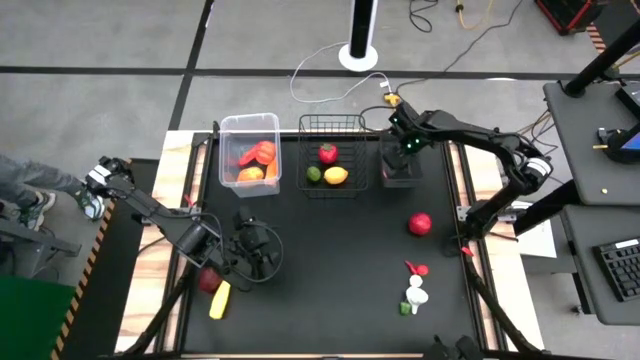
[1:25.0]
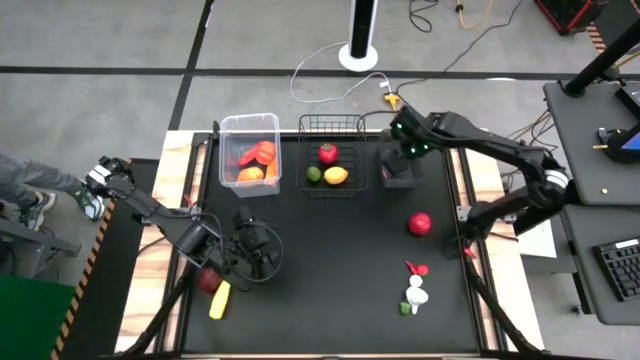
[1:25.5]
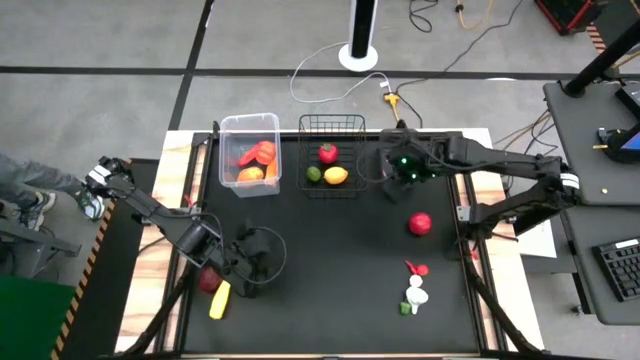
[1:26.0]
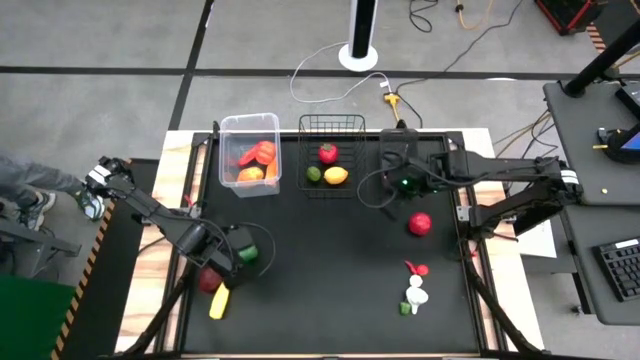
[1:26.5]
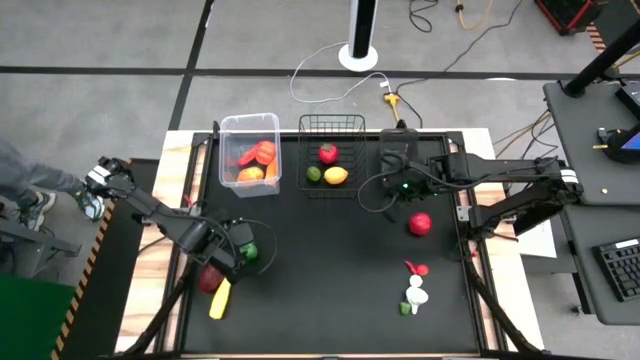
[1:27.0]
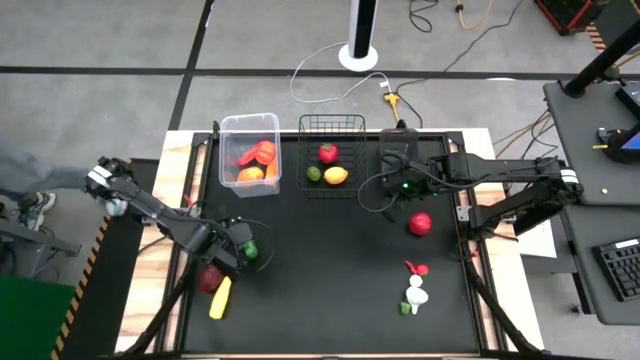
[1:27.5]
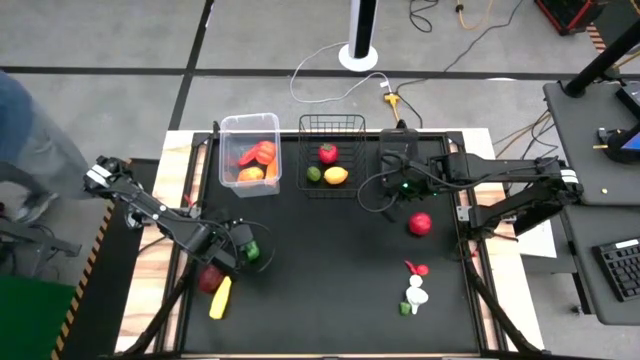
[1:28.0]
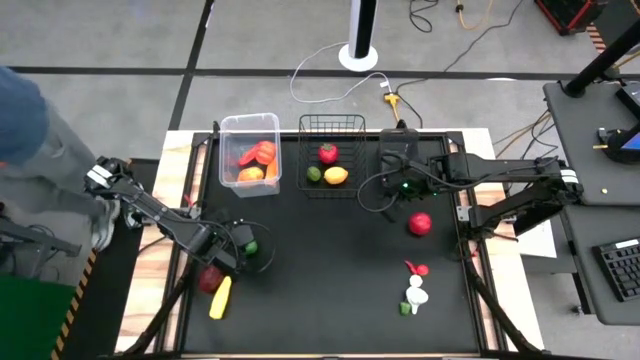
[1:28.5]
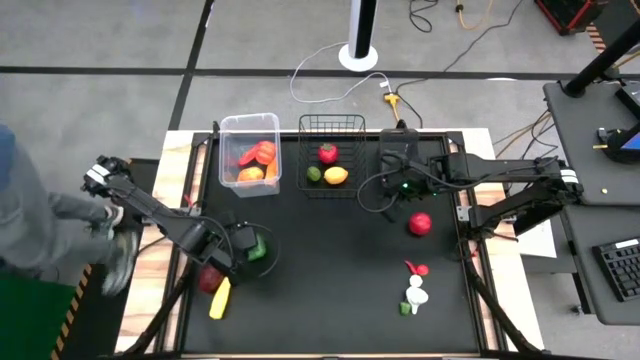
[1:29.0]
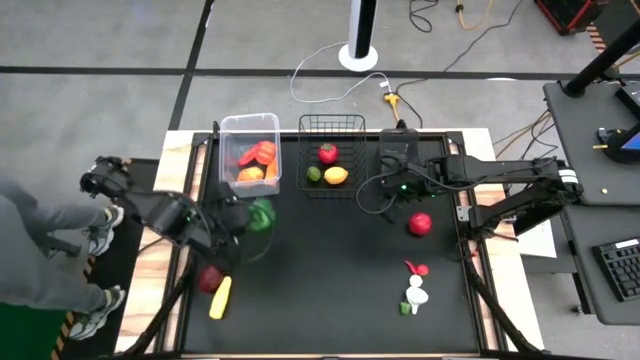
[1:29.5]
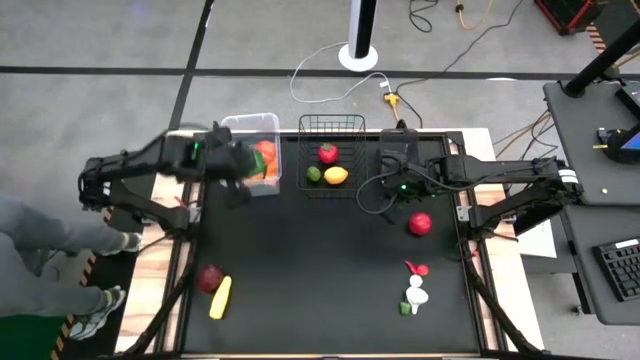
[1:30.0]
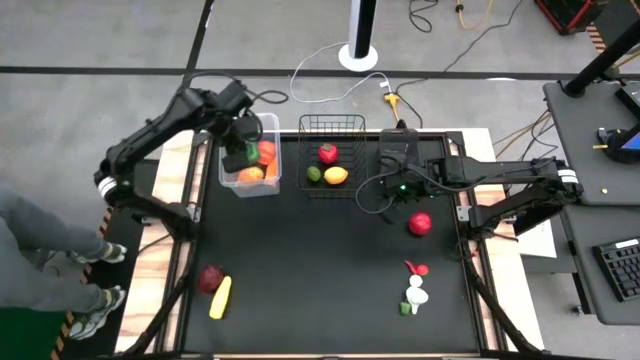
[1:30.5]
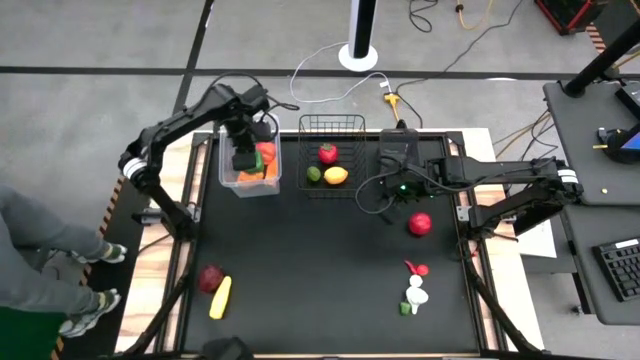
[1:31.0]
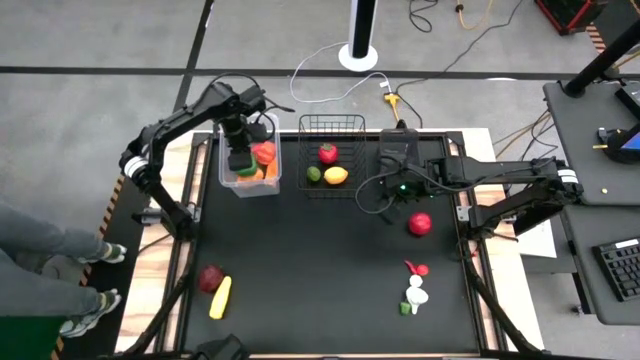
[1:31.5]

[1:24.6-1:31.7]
Task: Sort produce into baskets
Put the large green bell pepper into the transparent basket

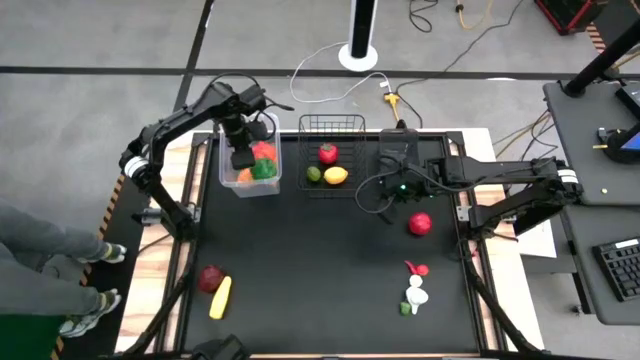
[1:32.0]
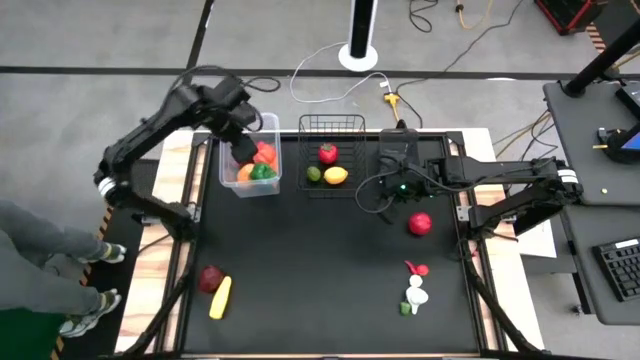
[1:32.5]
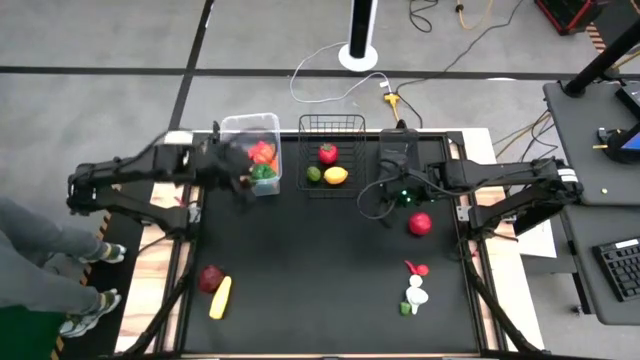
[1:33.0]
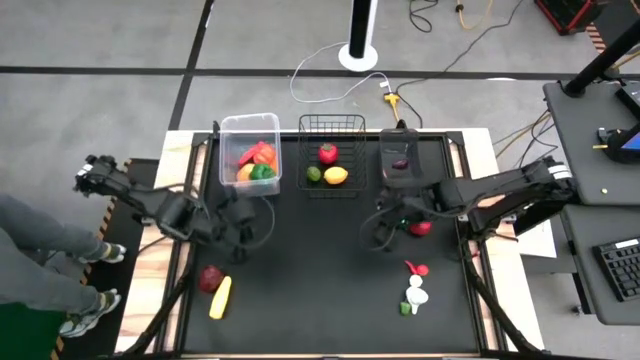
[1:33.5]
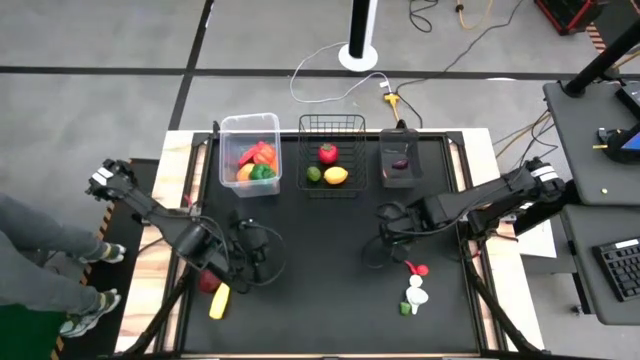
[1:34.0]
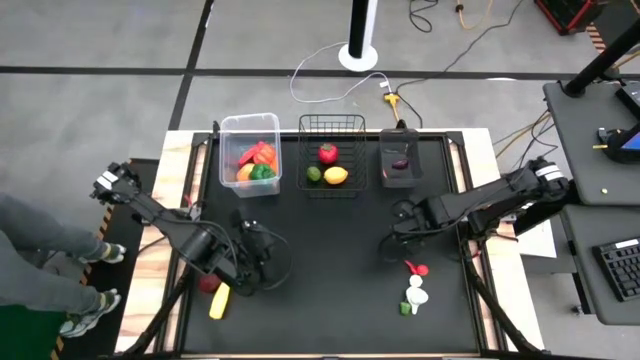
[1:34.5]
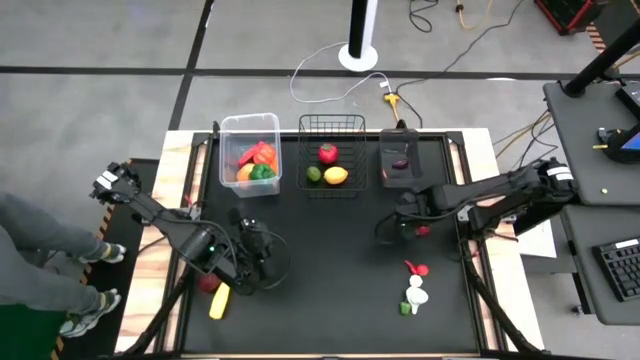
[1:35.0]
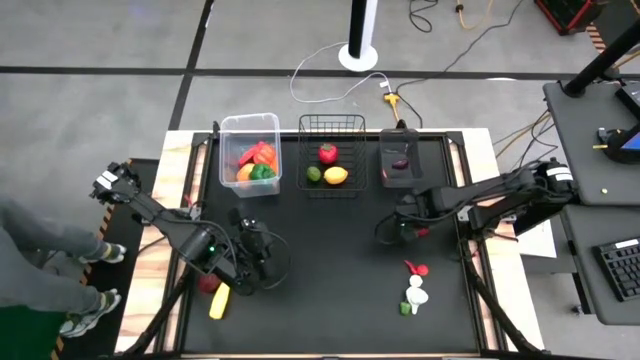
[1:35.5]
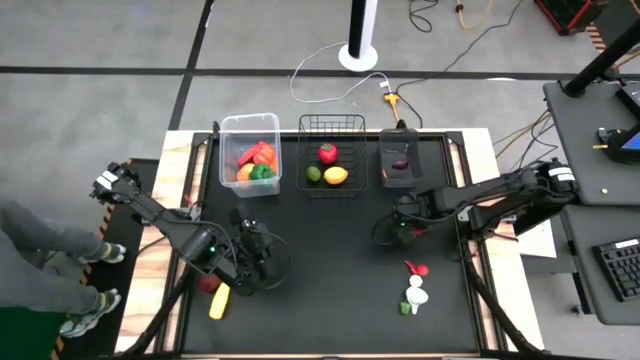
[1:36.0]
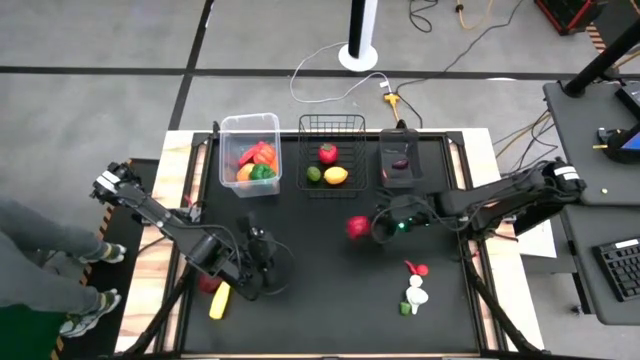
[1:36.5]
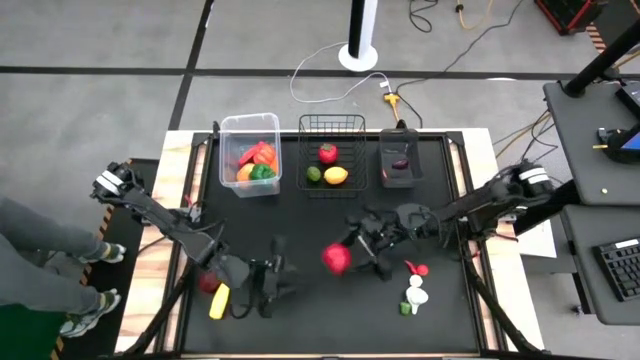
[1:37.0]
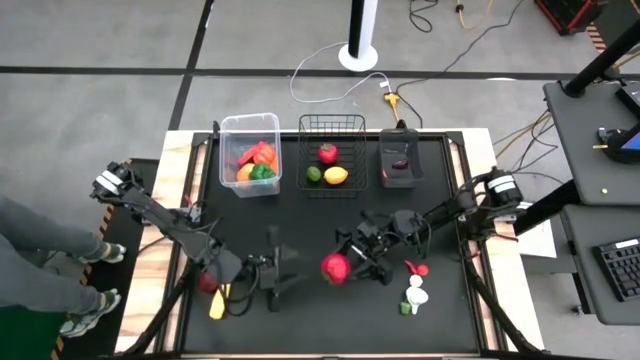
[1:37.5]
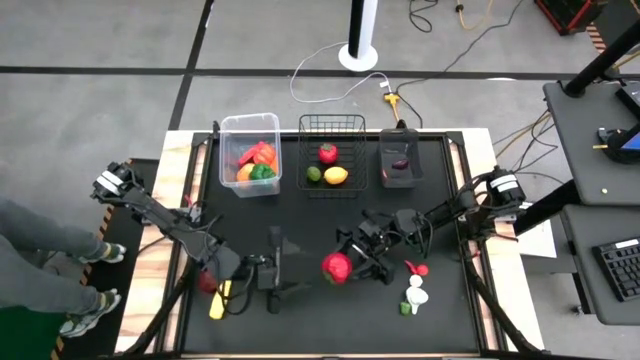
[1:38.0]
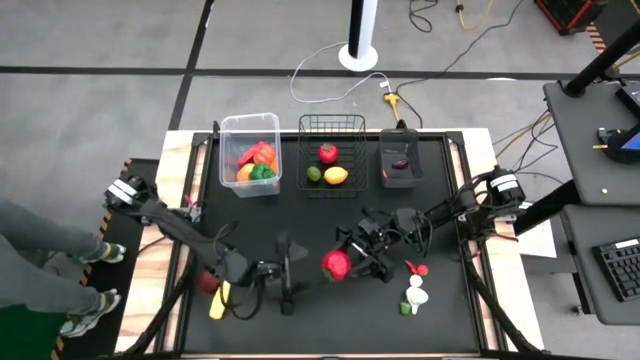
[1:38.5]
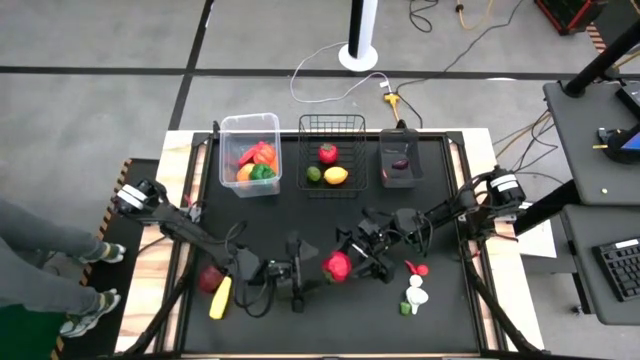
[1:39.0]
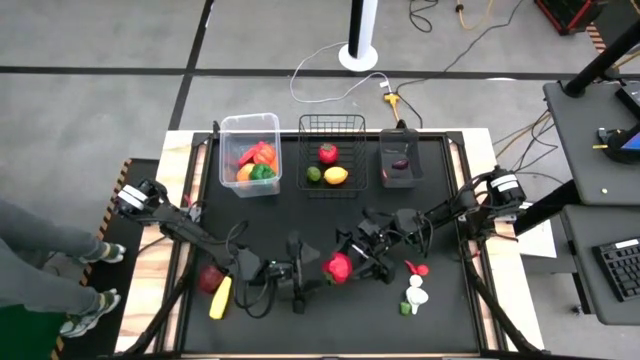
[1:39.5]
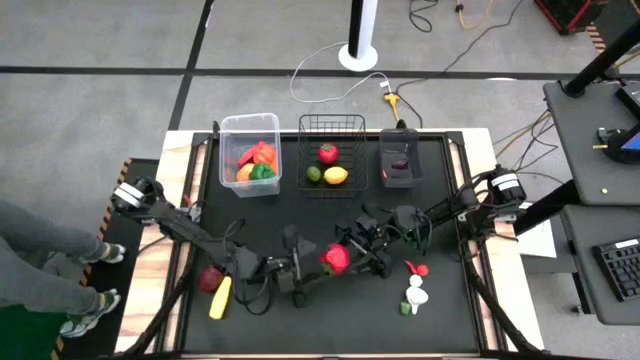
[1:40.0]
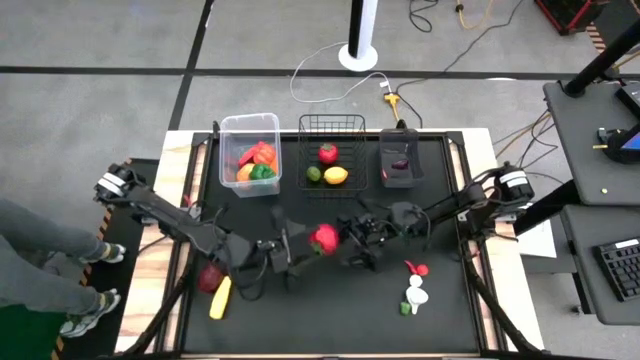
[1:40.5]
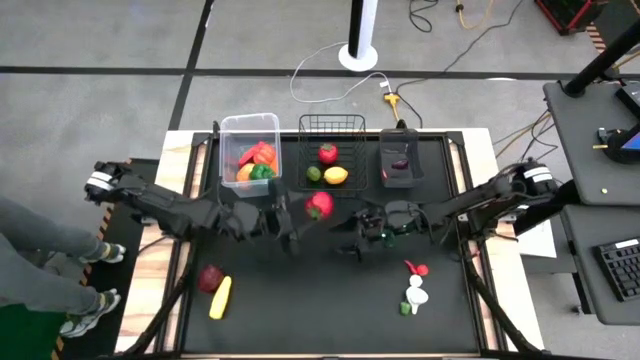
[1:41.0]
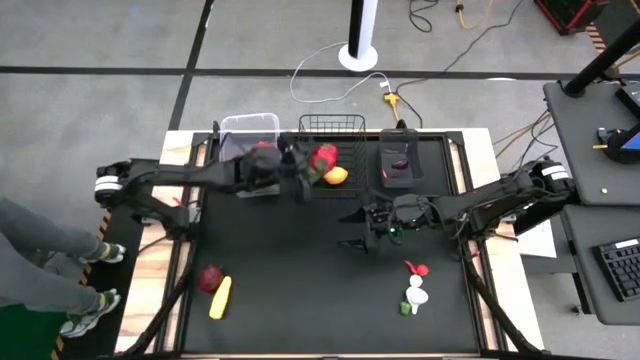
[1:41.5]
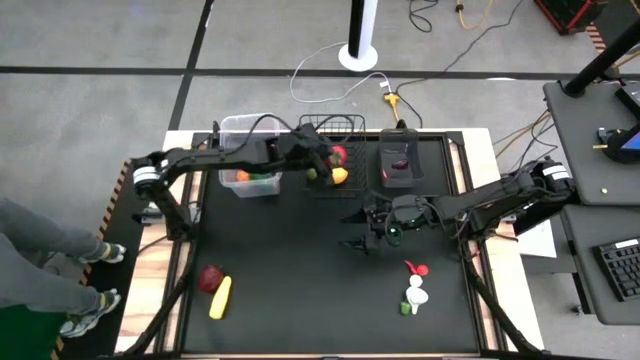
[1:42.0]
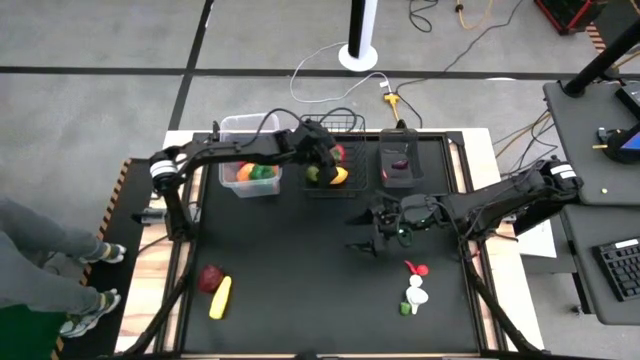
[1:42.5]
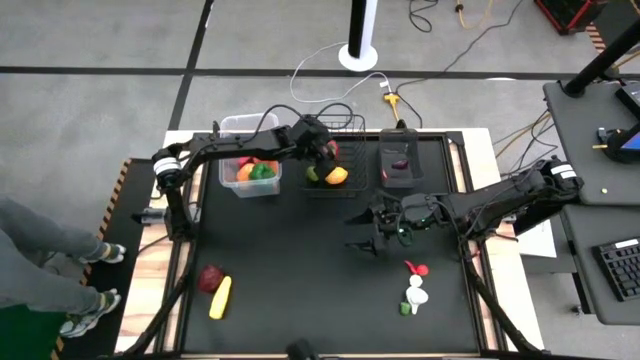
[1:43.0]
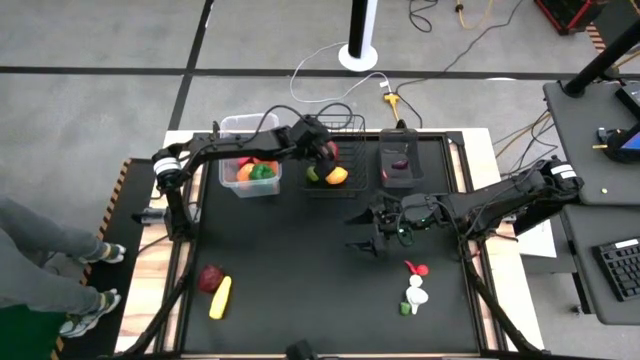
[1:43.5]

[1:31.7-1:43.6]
Put the tomato into the wire basket

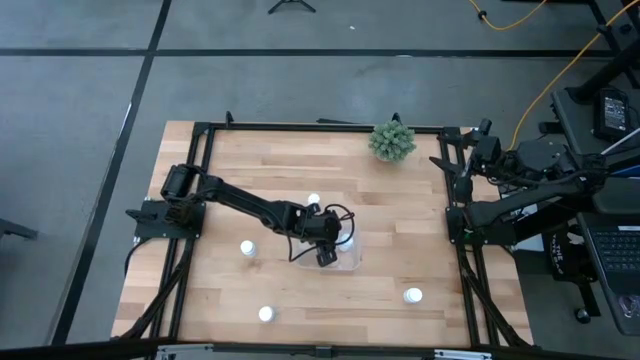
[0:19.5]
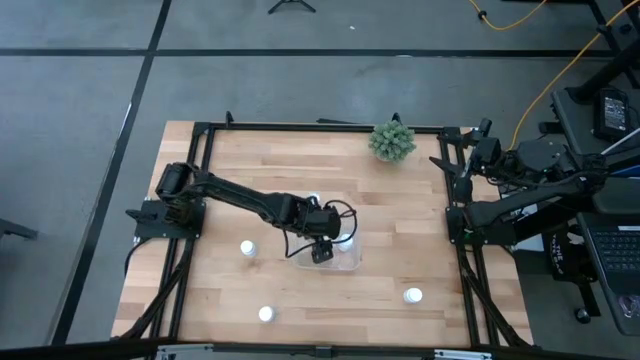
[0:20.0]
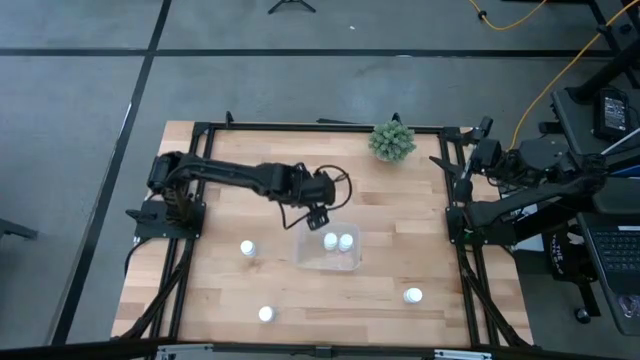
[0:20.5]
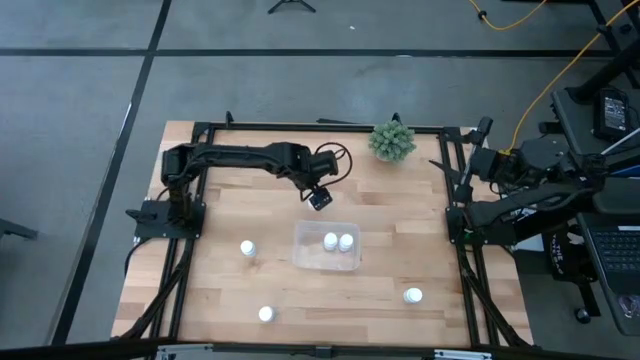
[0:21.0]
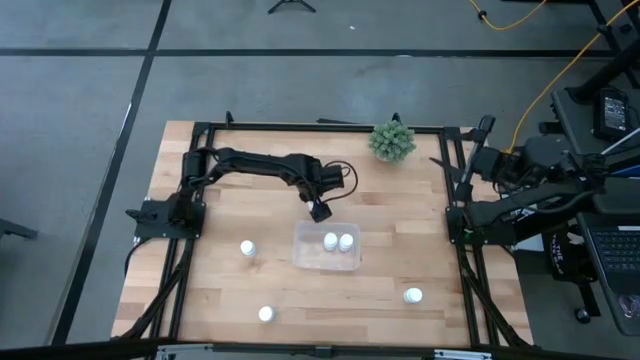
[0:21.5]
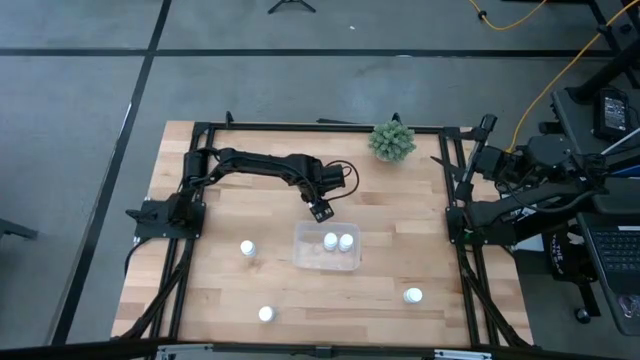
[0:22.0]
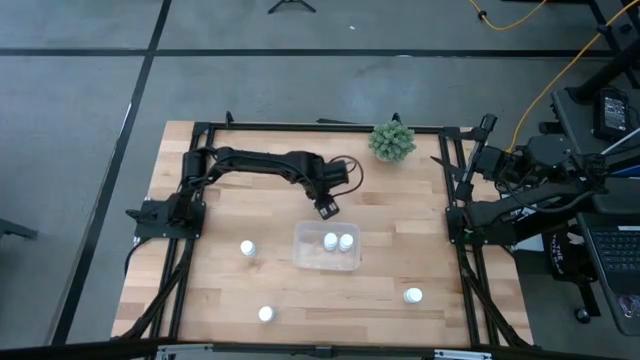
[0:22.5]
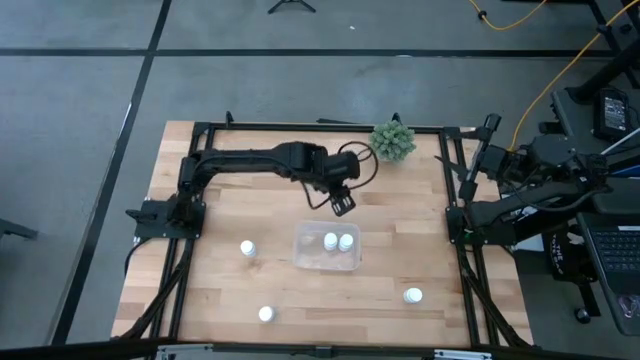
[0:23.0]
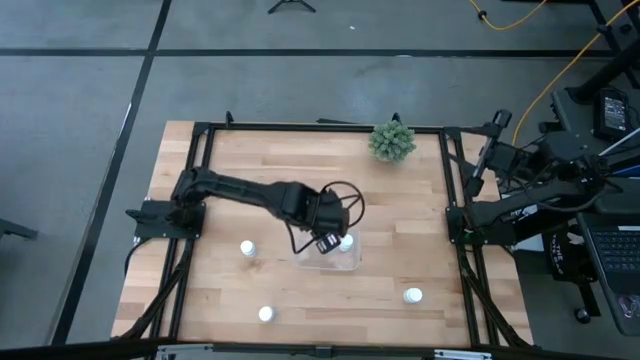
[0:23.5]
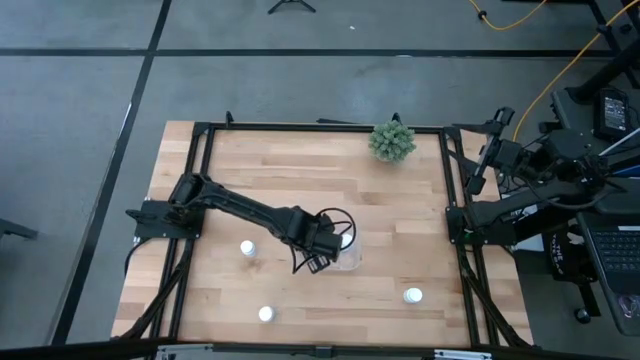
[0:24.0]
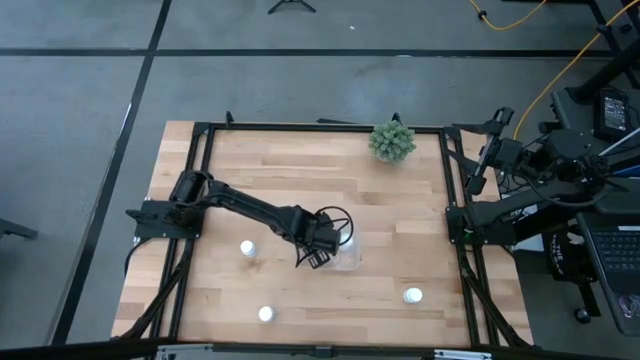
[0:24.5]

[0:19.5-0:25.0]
Task: Pick and place pill bottles into a basket
Put the white pill bottle into the transparent bin
